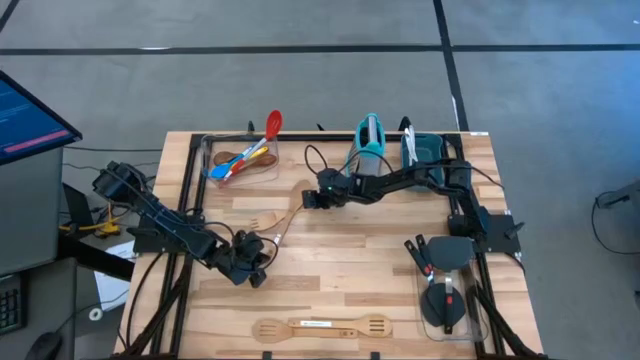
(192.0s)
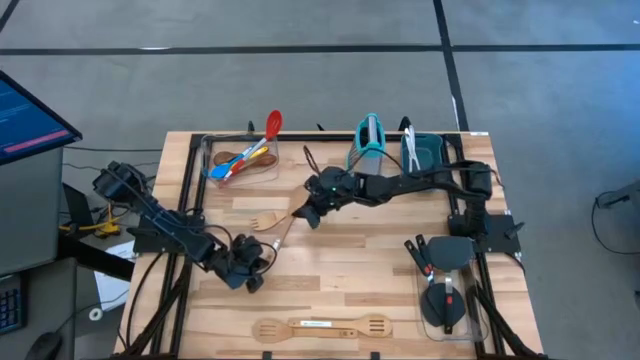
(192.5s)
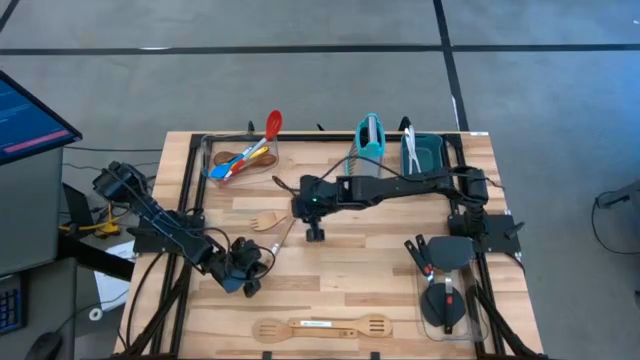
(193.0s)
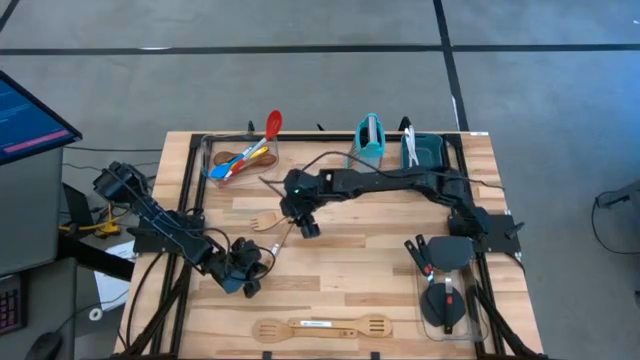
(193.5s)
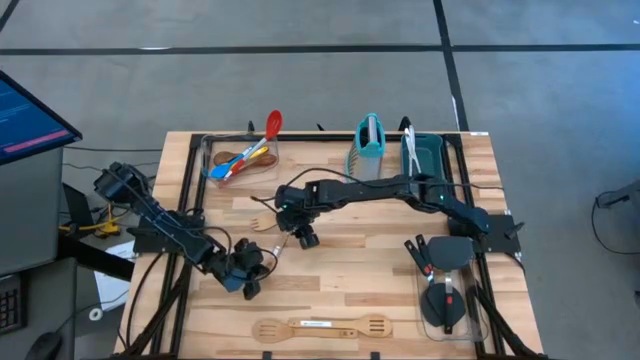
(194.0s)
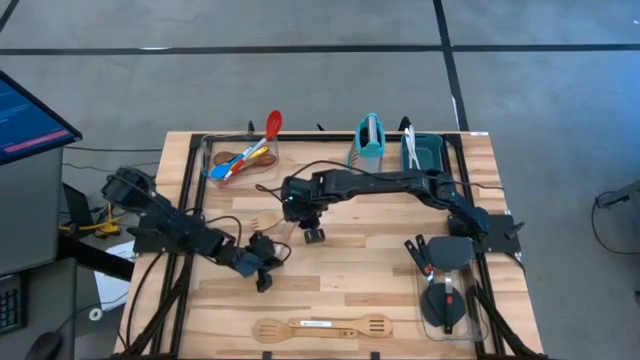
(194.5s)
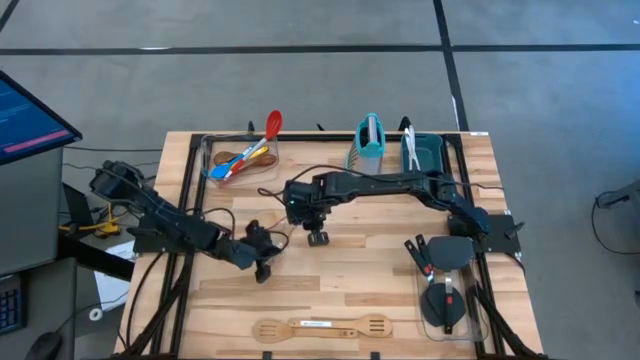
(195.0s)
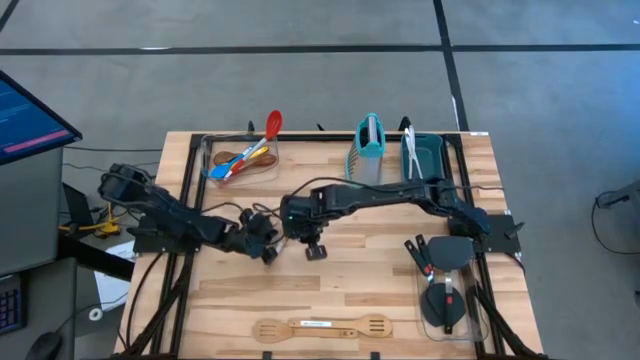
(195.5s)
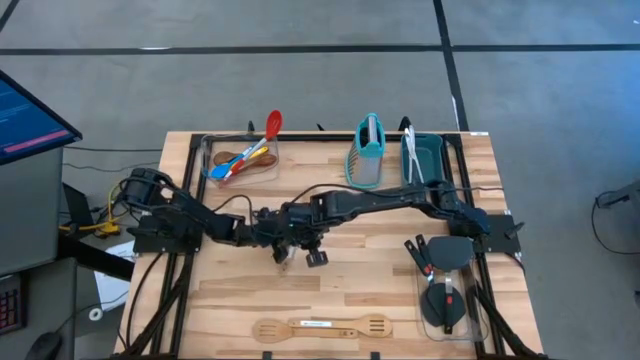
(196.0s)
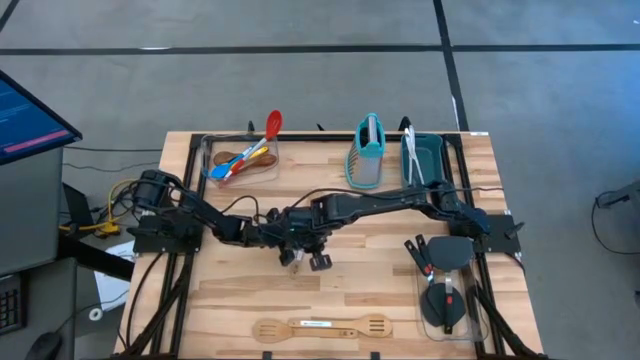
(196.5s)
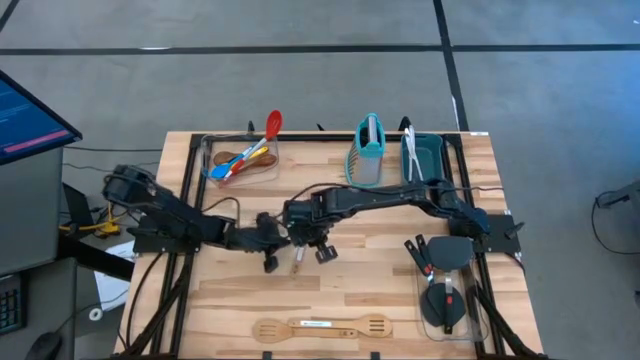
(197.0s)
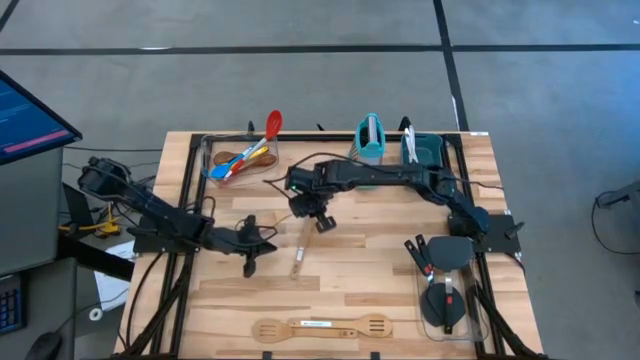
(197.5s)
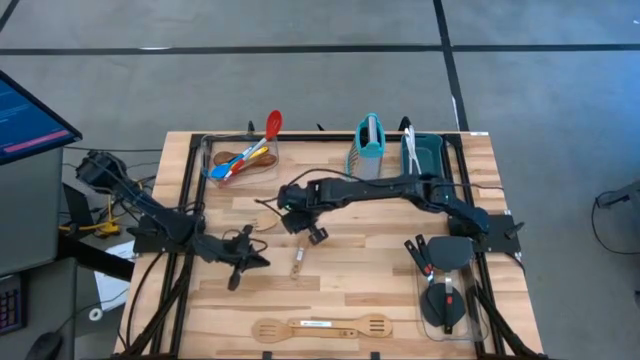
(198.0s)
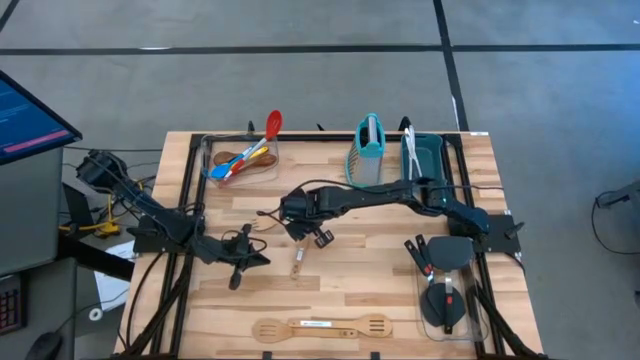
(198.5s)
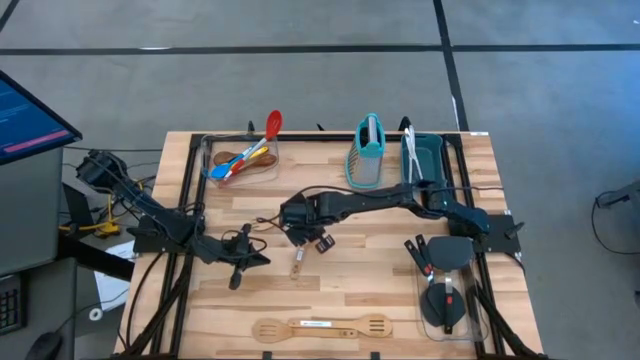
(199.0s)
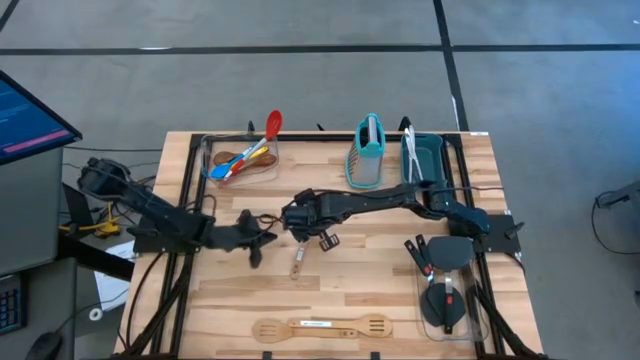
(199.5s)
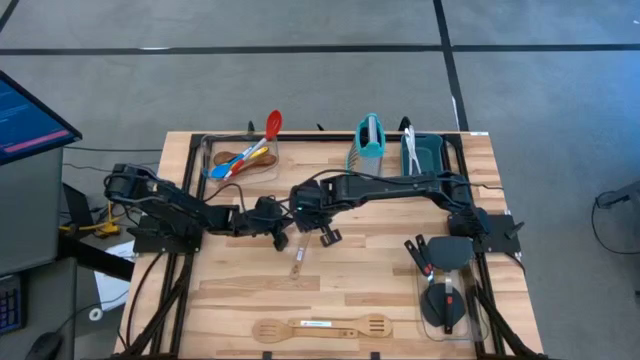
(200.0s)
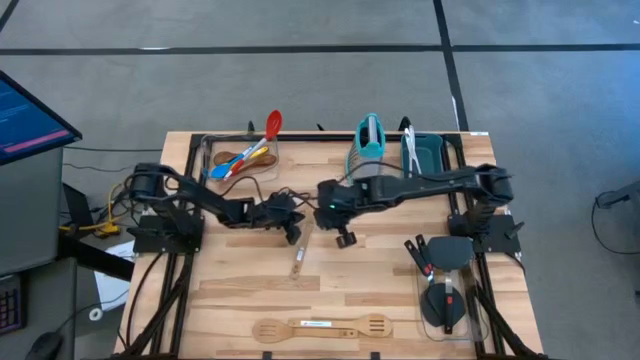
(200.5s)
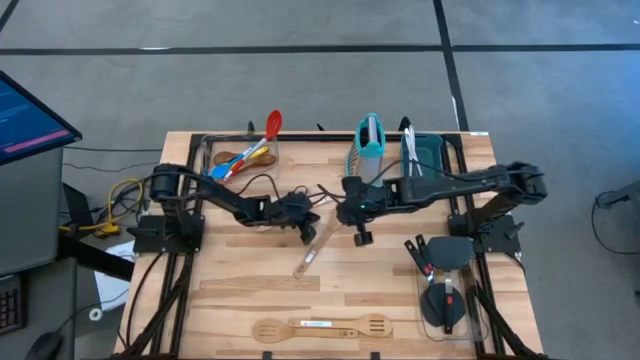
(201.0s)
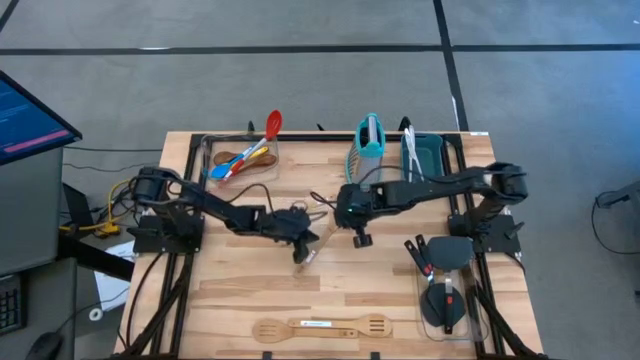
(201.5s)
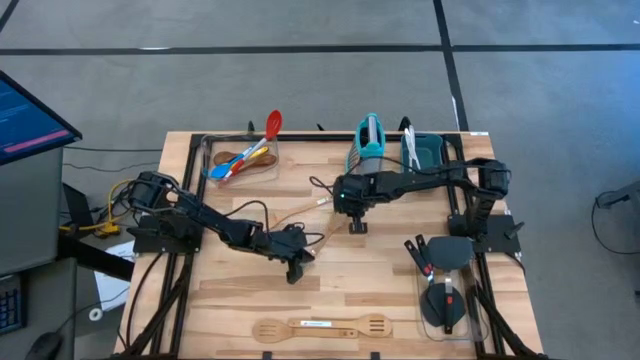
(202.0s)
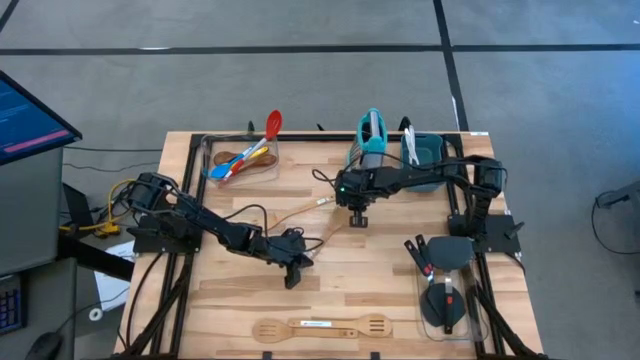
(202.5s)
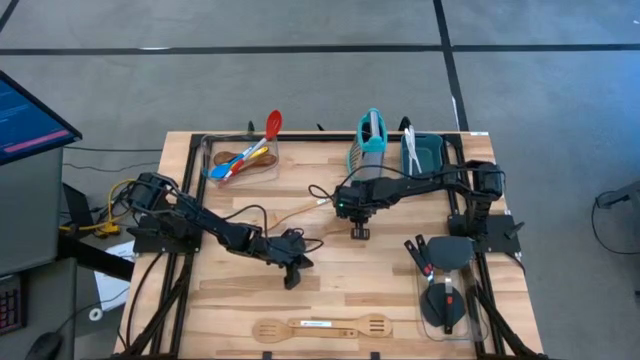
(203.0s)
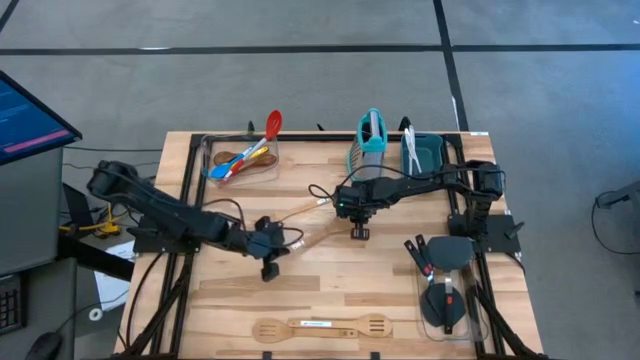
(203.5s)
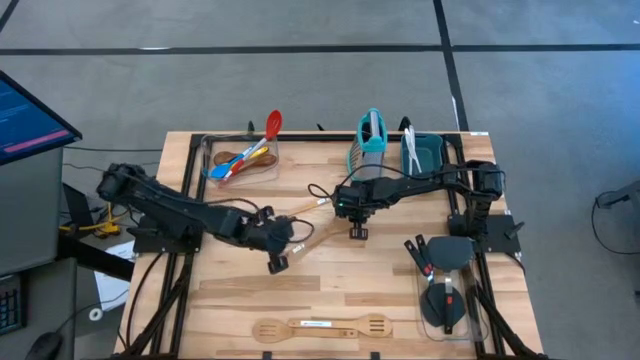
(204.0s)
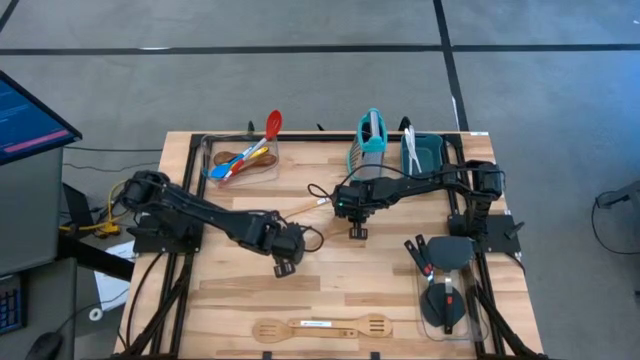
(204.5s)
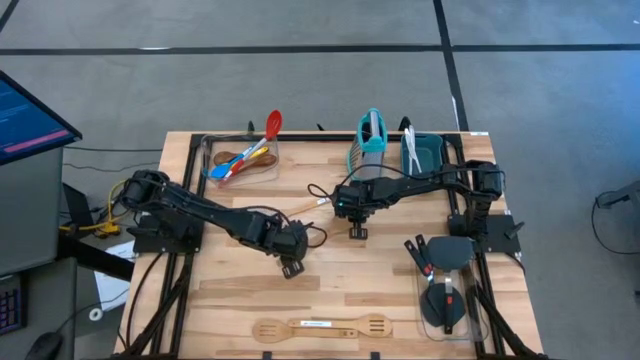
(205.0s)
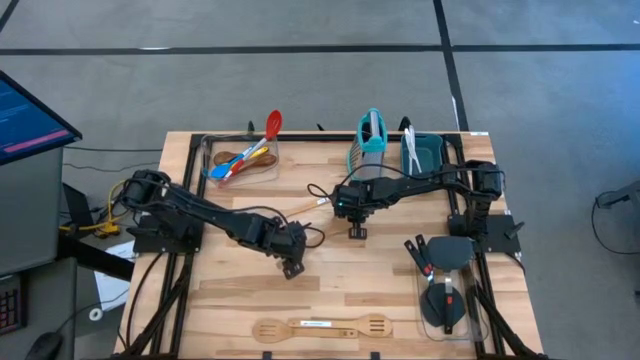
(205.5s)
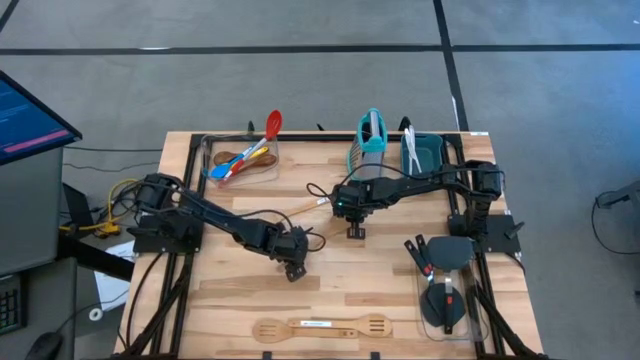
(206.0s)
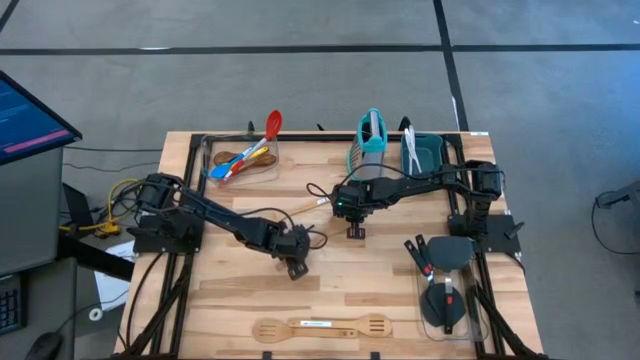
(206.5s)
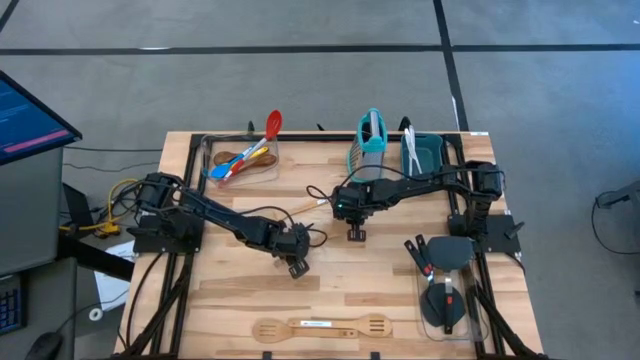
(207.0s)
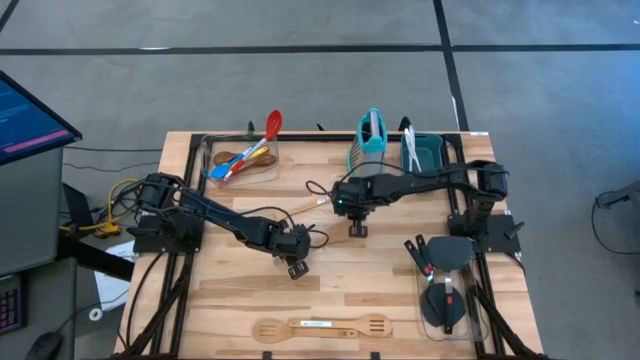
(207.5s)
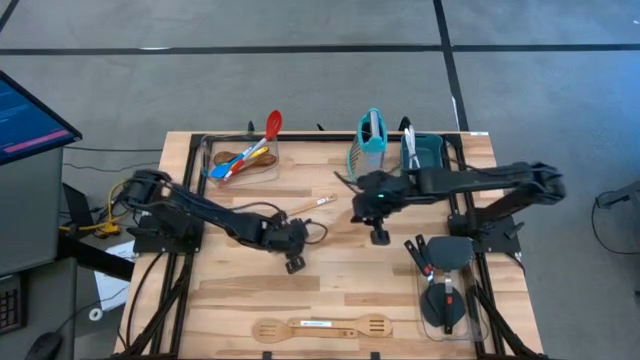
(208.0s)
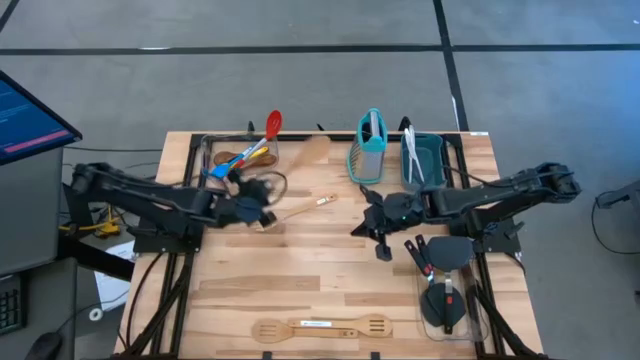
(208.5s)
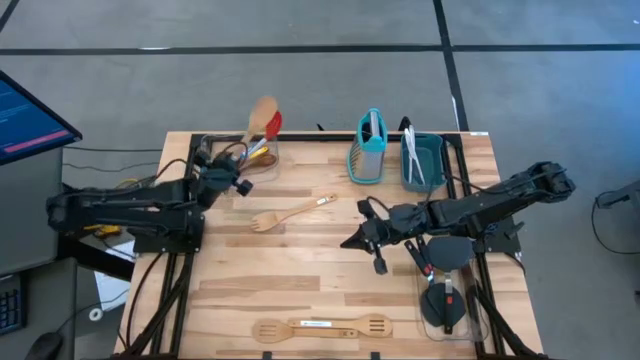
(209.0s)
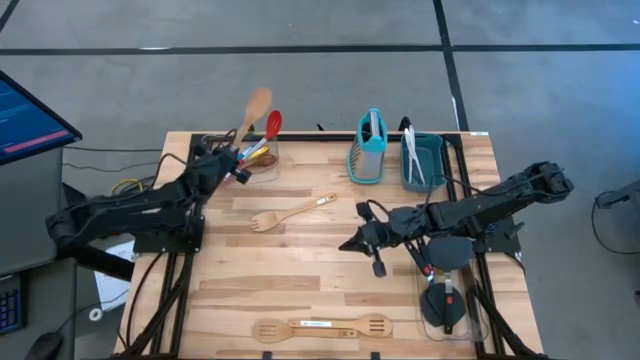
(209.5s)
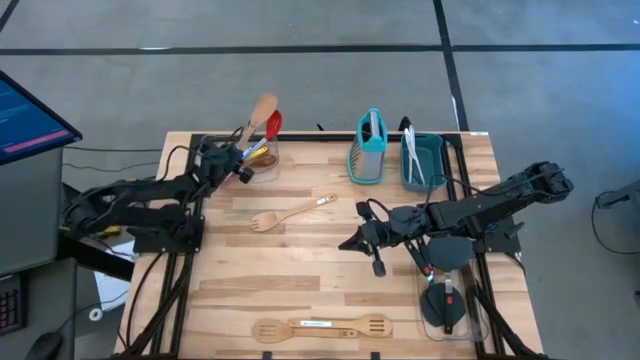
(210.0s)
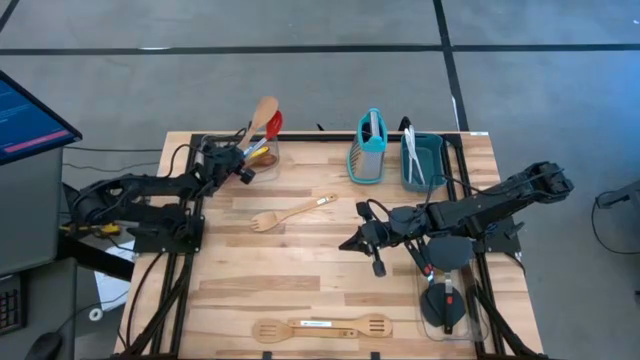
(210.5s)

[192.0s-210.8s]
Task: Pick & Place Kitchen Items
Put the wooden spoon into the left transparent bin

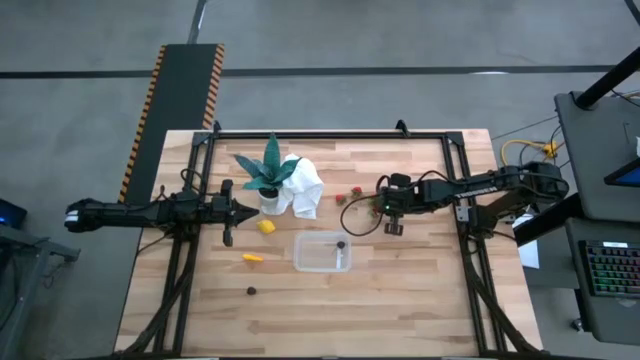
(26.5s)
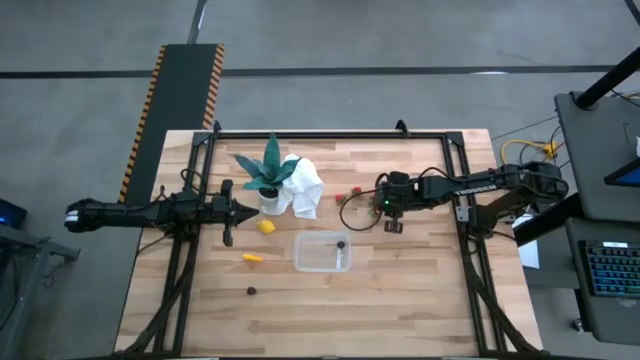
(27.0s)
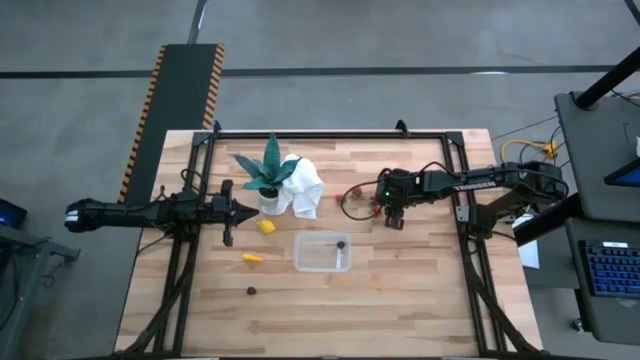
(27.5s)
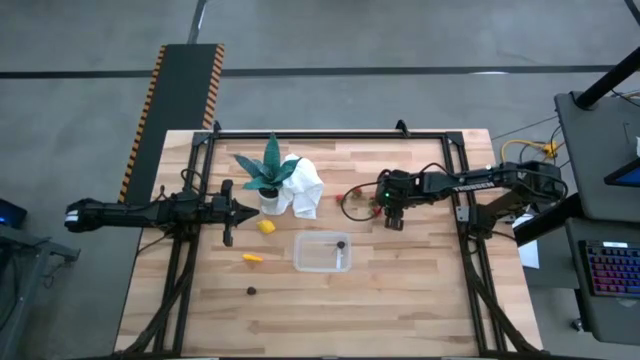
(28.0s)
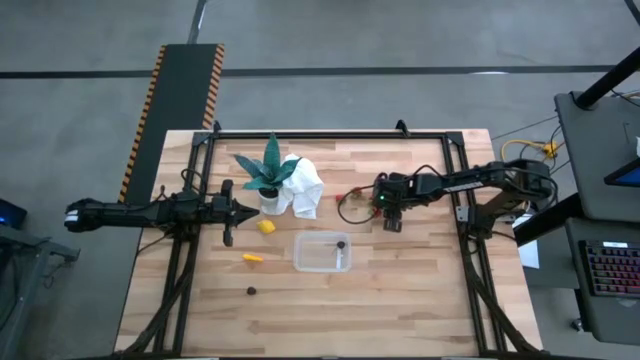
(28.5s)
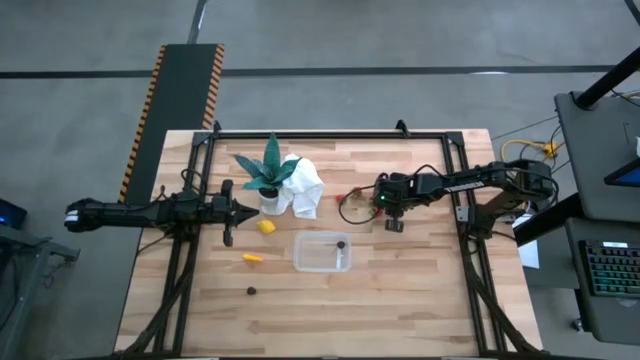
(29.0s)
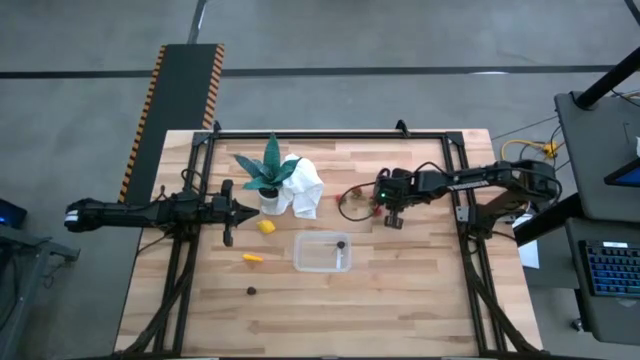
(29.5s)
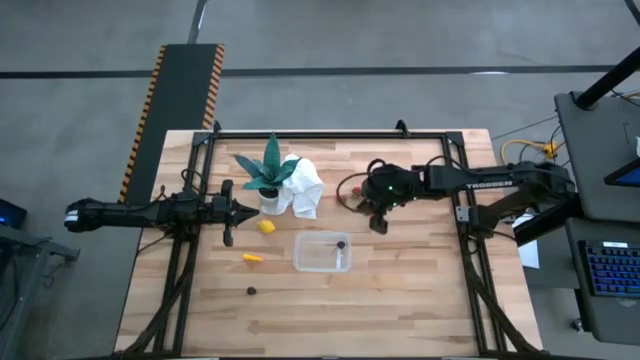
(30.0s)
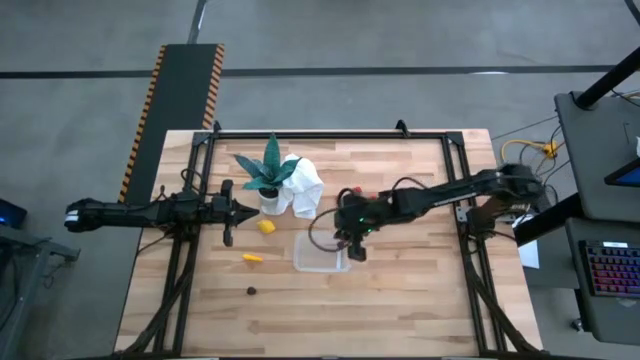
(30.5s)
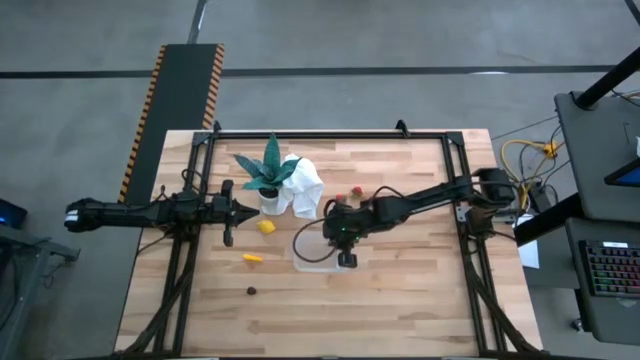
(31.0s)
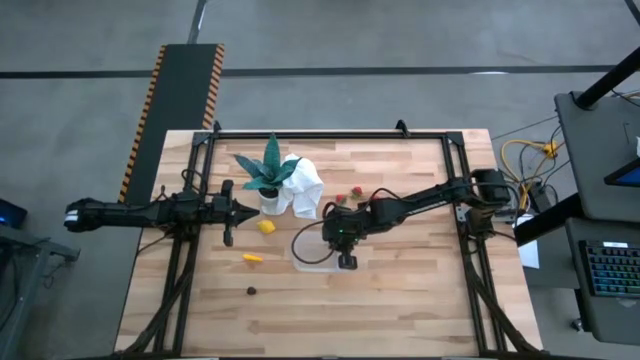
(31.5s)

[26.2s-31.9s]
Task: Pick and placing Produce into tupperware
Put the strawberry into the bin
